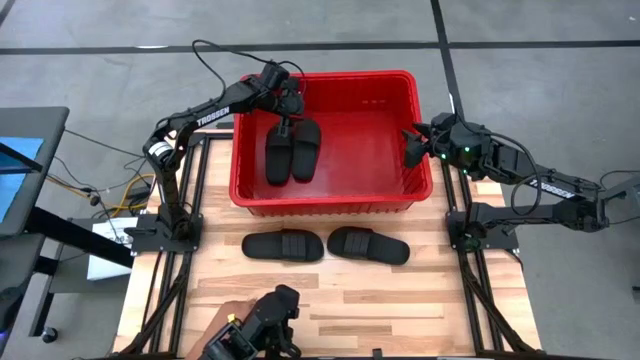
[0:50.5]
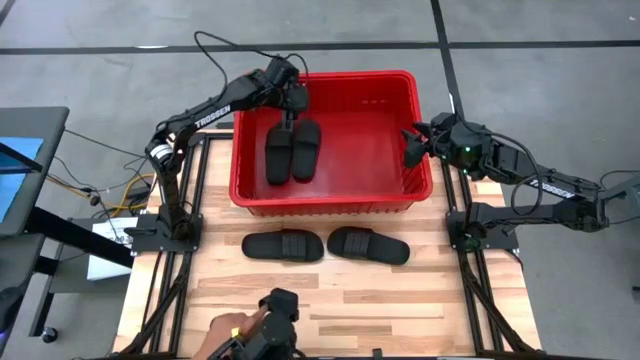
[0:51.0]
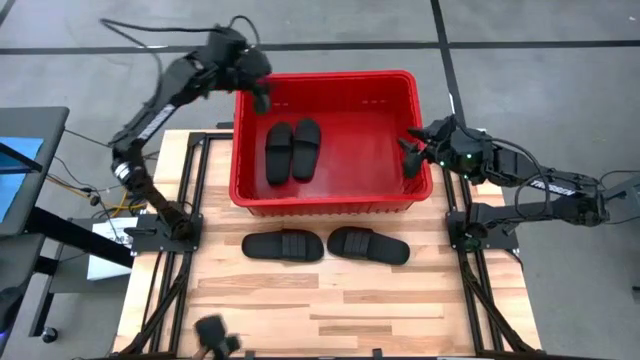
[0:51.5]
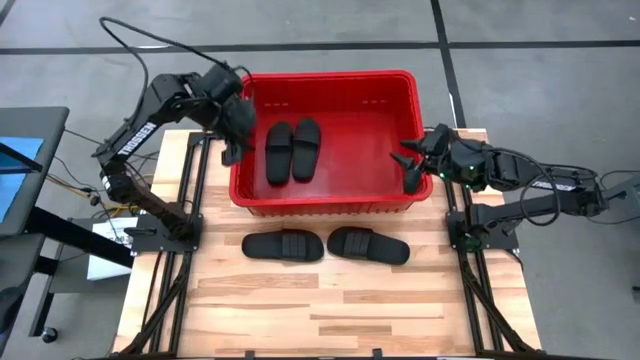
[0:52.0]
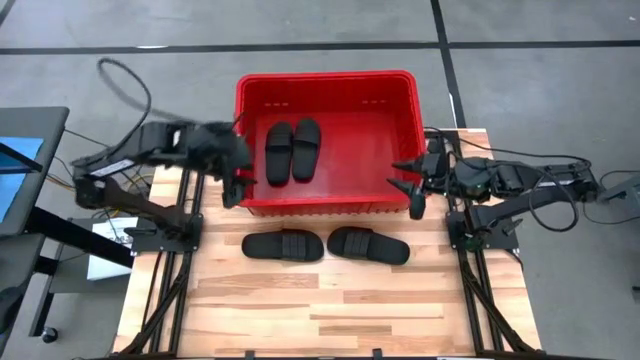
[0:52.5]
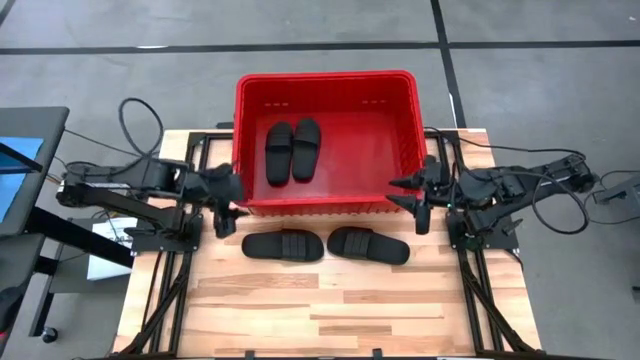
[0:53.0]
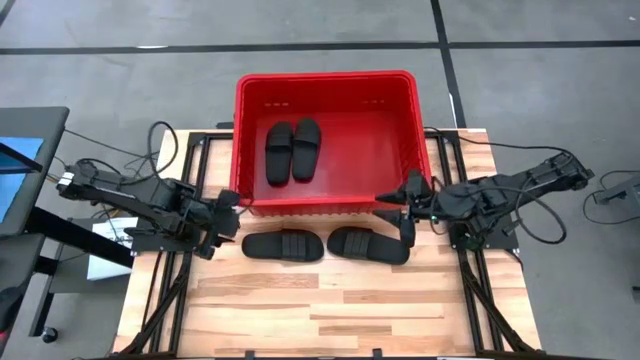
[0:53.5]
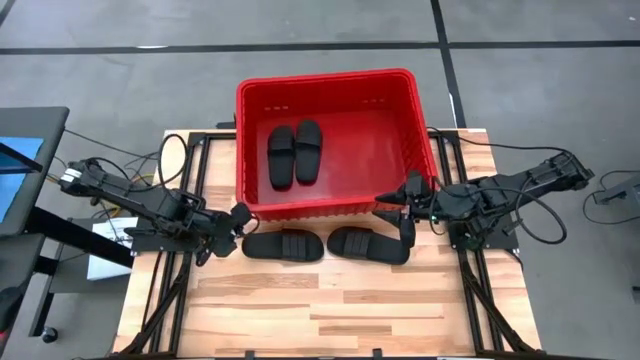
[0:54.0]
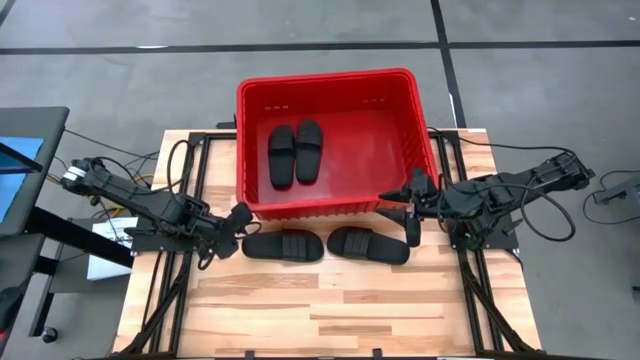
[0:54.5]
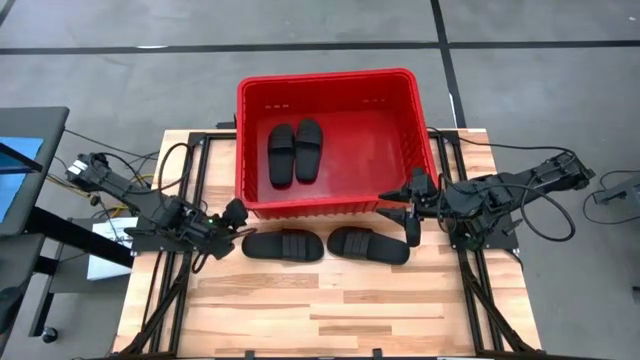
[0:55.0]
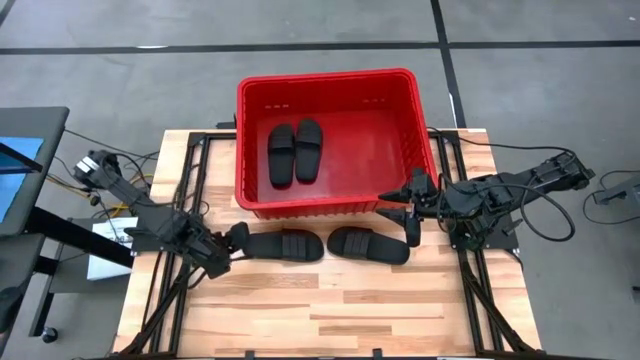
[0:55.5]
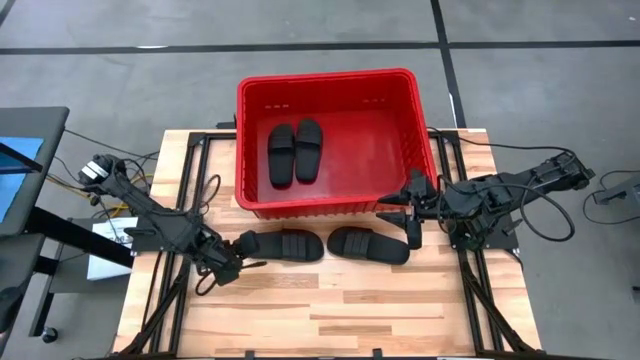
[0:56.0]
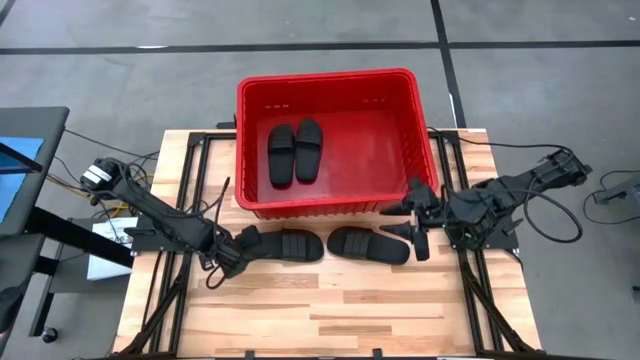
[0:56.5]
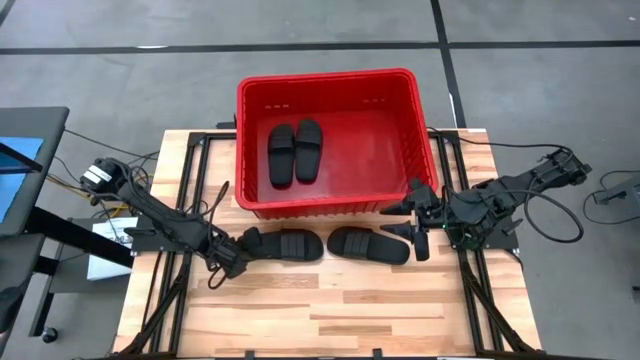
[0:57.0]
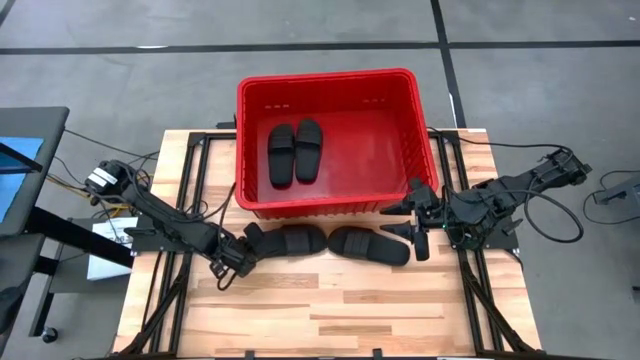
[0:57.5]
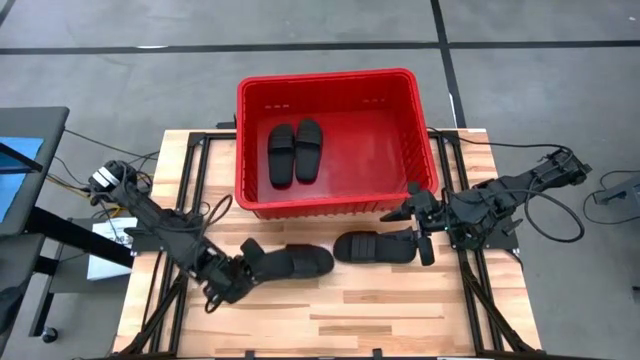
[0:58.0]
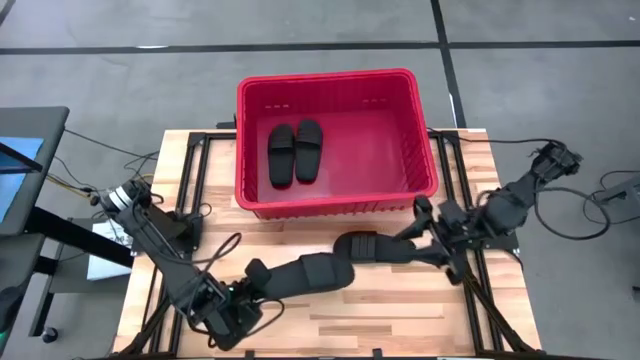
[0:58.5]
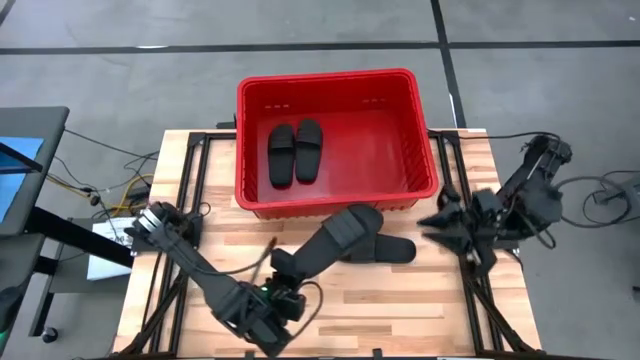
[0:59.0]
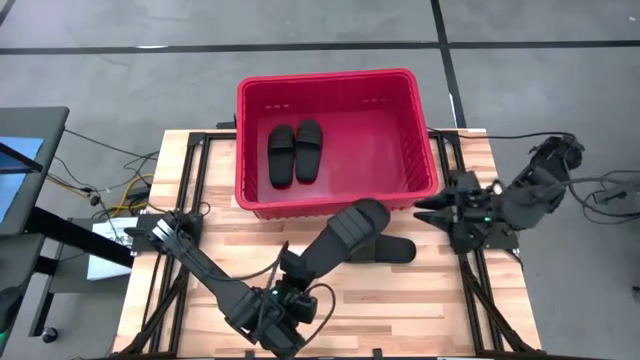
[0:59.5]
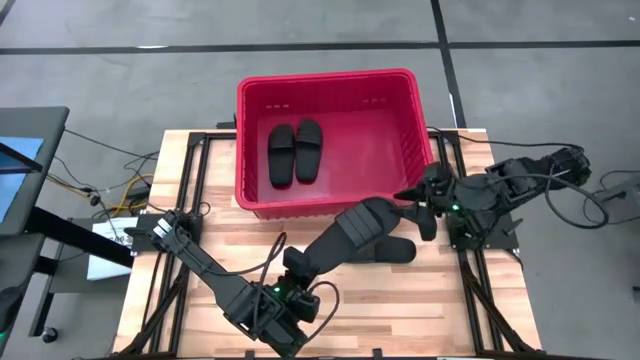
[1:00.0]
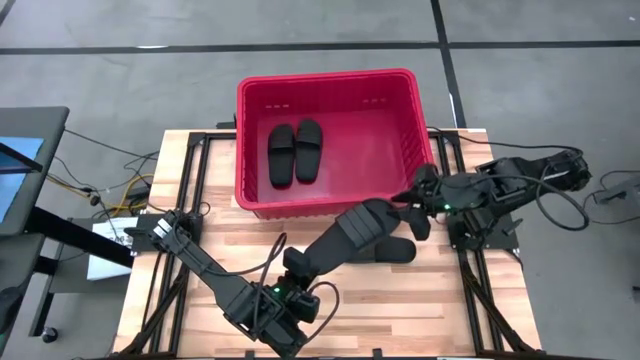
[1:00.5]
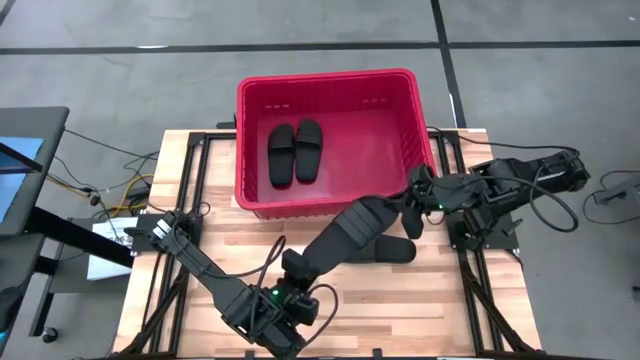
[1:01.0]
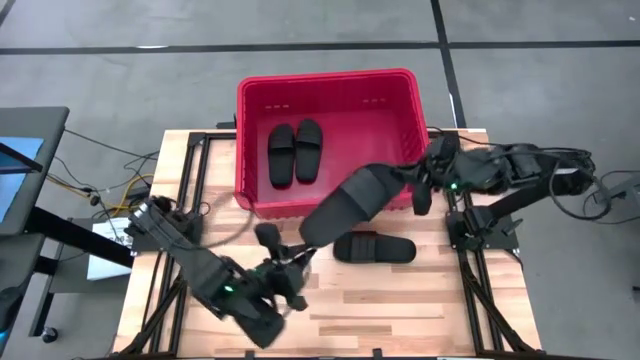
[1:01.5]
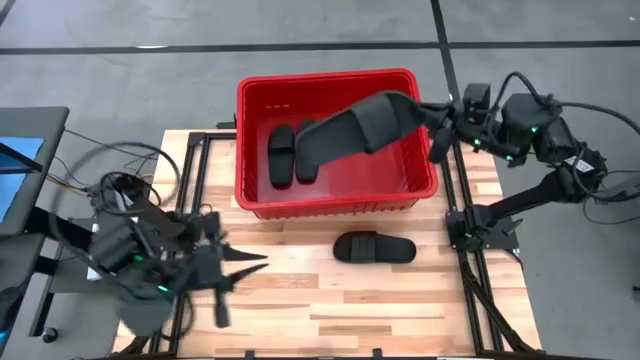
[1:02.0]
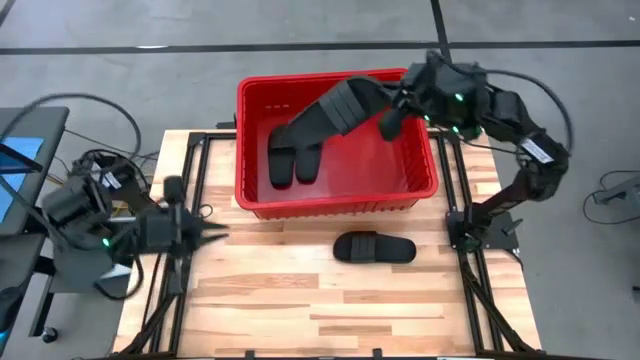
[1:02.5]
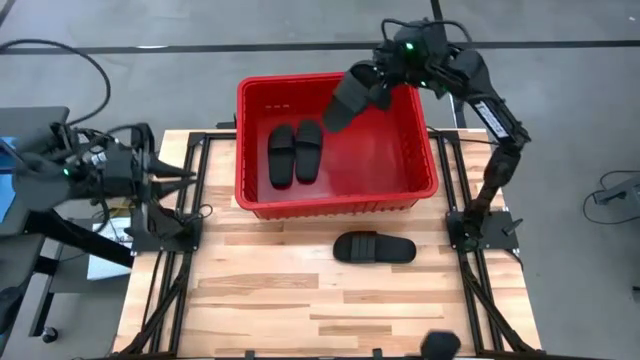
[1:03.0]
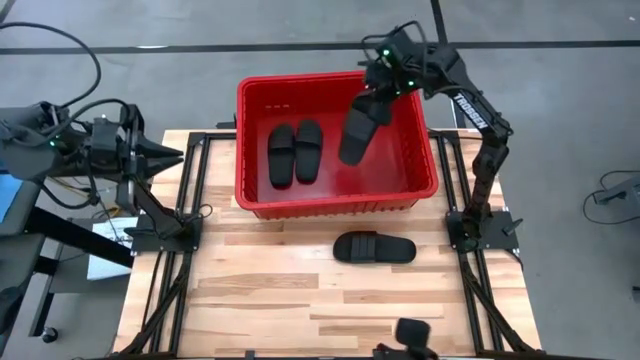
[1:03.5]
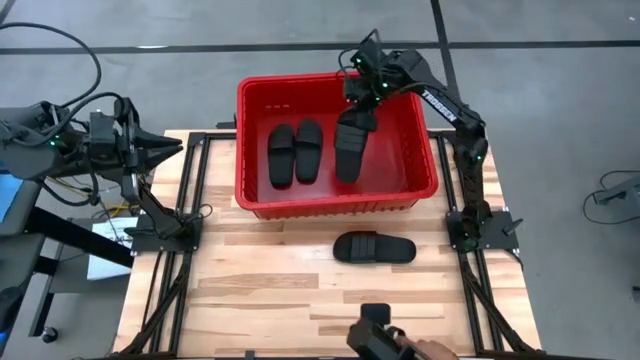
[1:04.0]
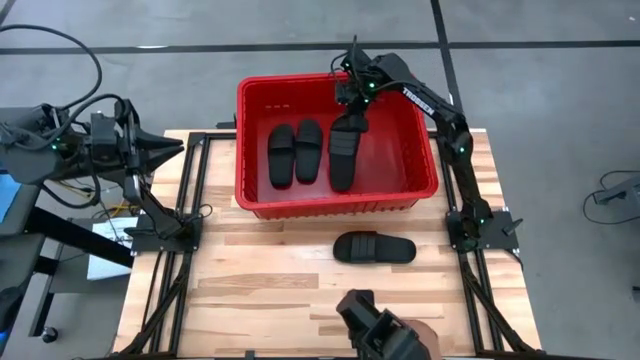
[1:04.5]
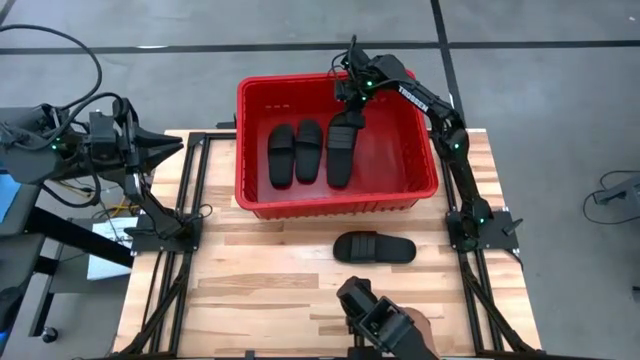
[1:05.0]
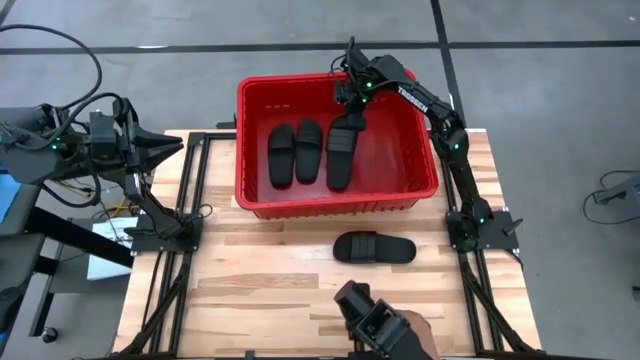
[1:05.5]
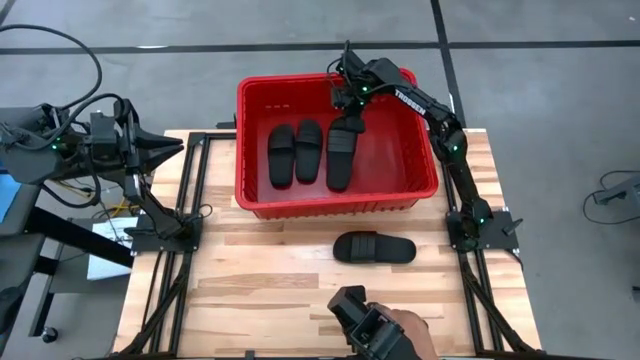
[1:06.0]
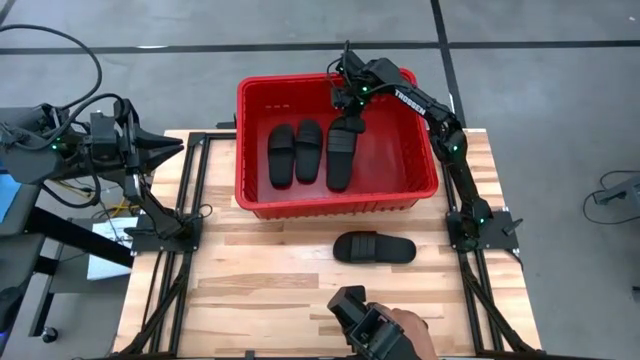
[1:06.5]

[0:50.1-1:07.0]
Task: Pick and place slides into bin
Put the black slide into the red bin

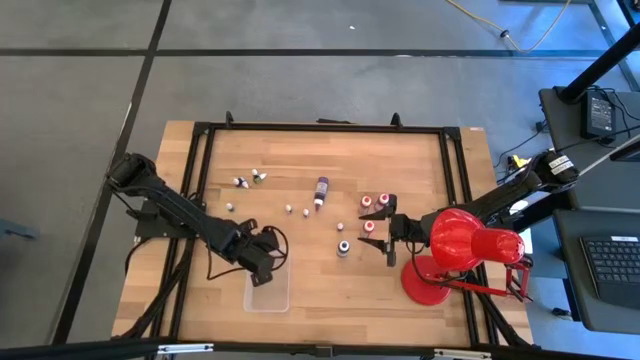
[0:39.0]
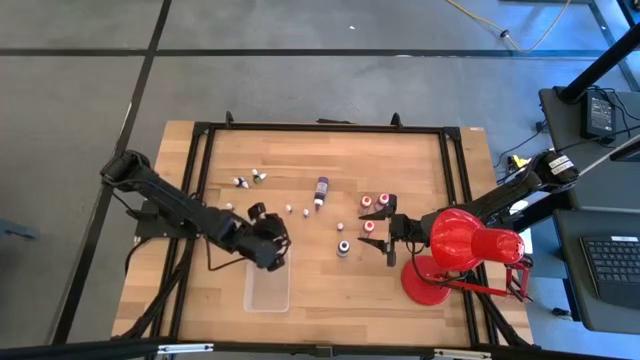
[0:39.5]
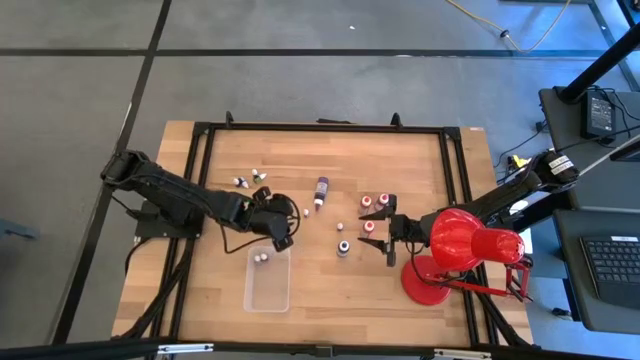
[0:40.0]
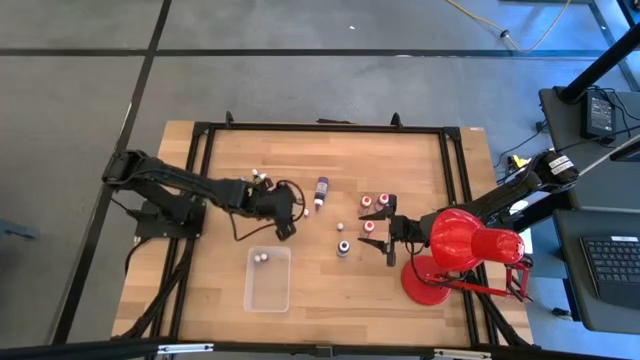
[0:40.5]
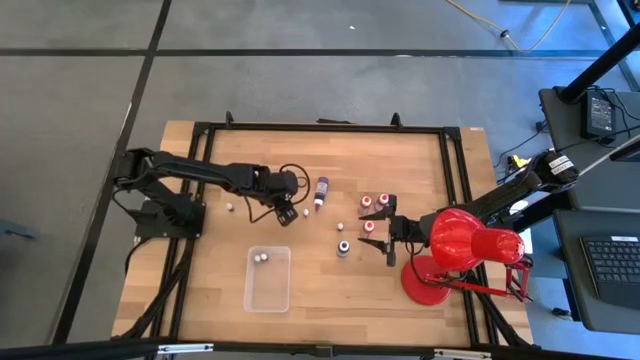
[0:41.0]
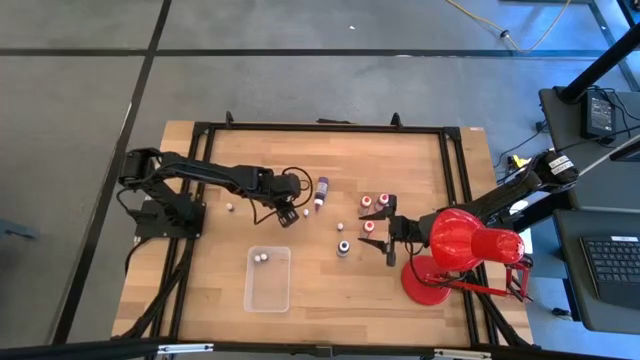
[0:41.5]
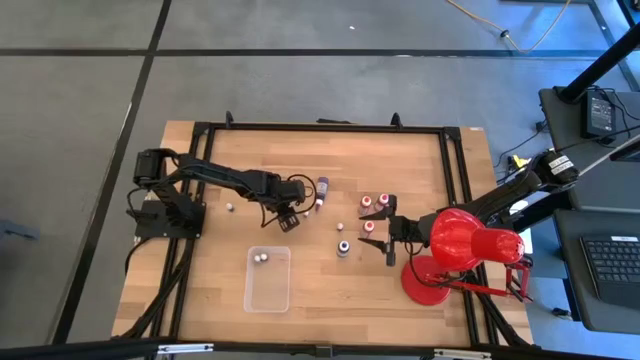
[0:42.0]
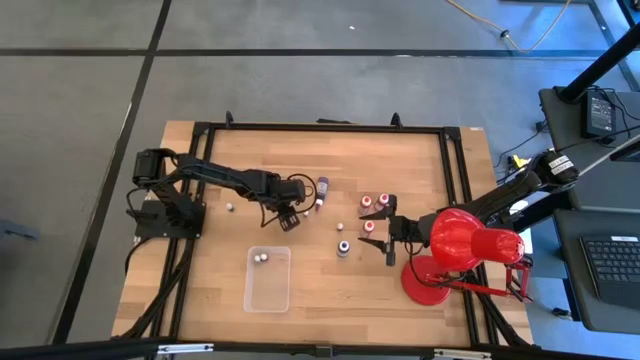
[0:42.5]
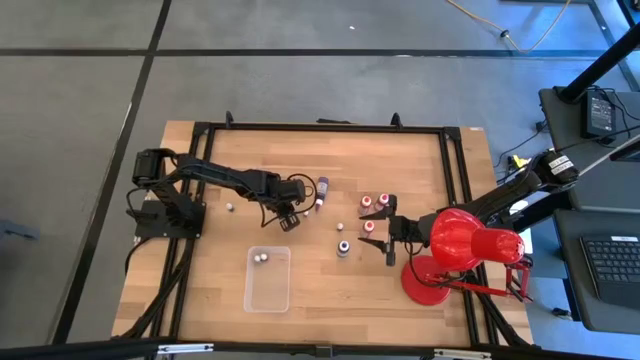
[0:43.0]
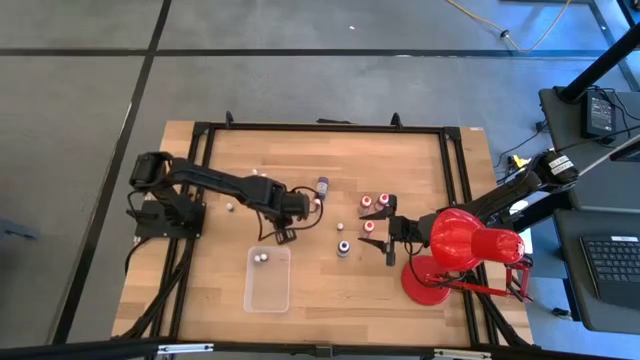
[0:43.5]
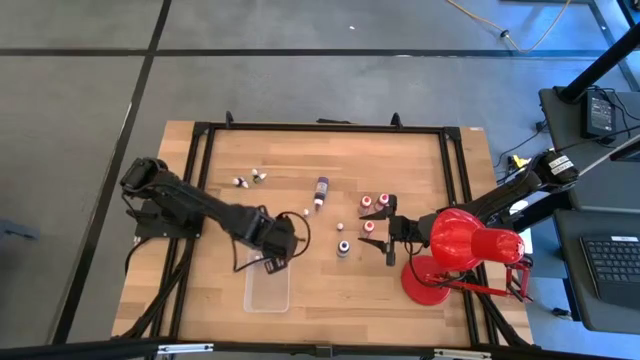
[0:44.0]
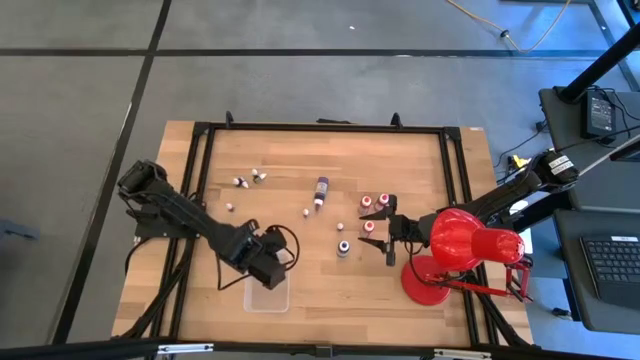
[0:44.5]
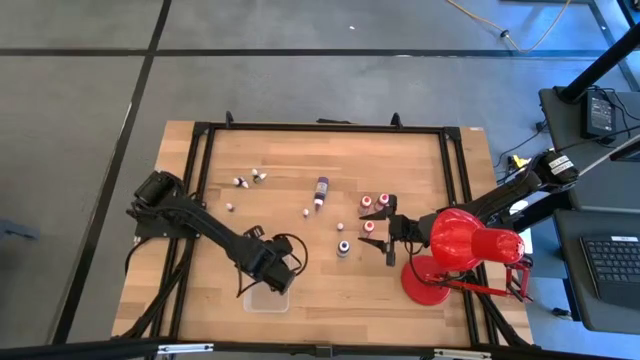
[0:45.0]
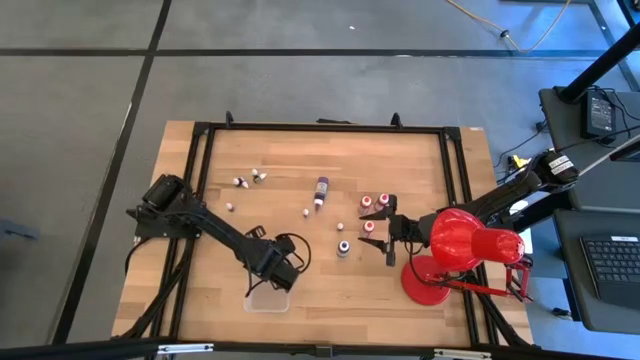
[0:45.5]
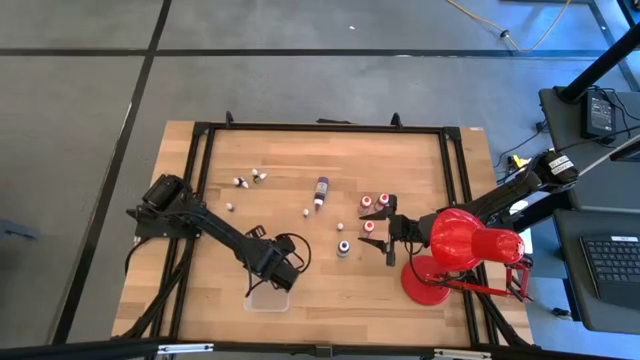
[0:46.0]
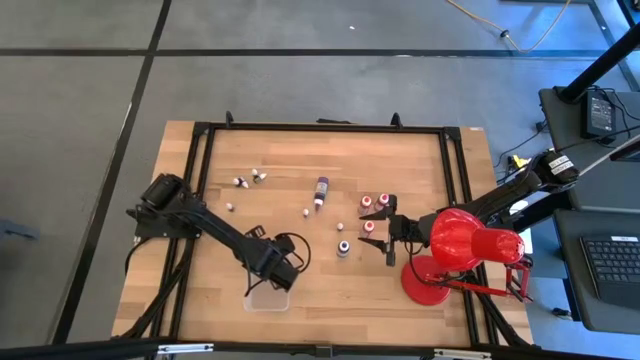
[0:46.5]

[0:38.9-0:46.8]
Task: Pick & Place food coloring
Put the small black food coloring bottle into the bin
